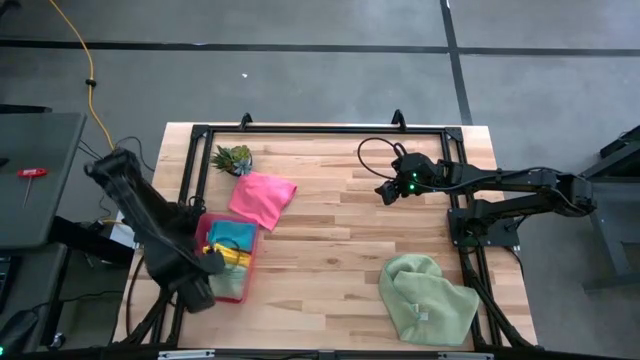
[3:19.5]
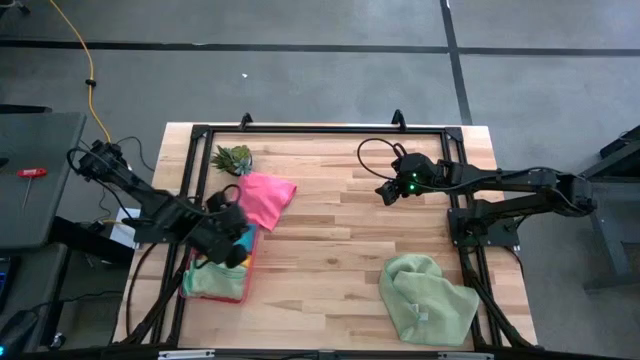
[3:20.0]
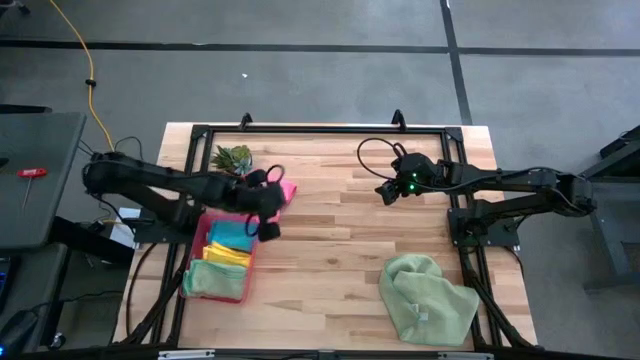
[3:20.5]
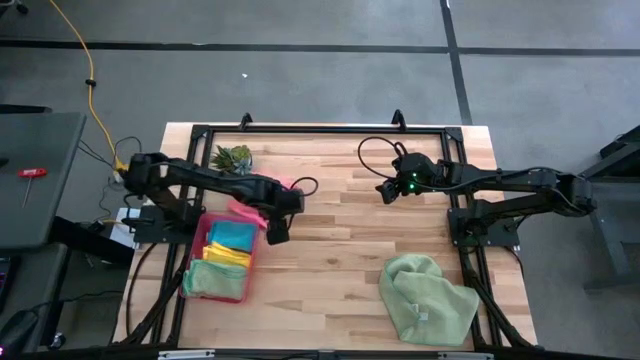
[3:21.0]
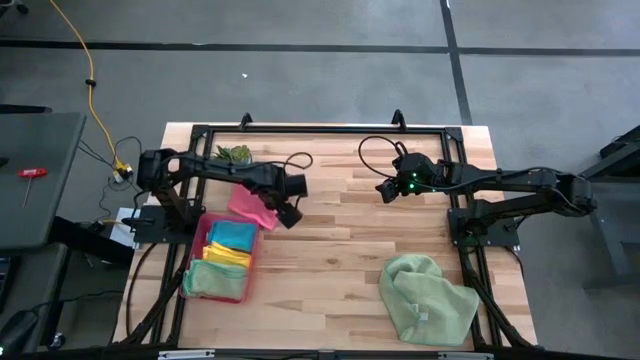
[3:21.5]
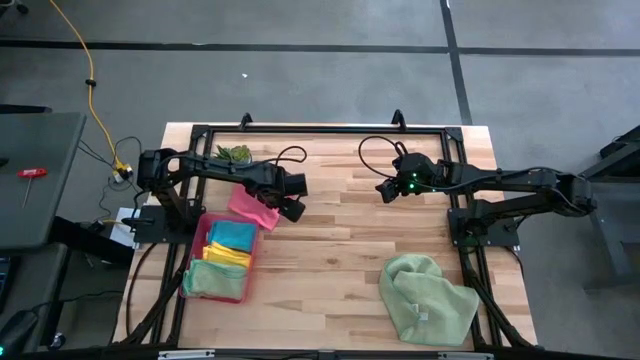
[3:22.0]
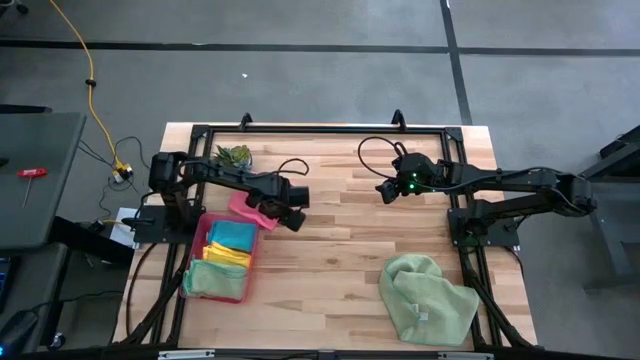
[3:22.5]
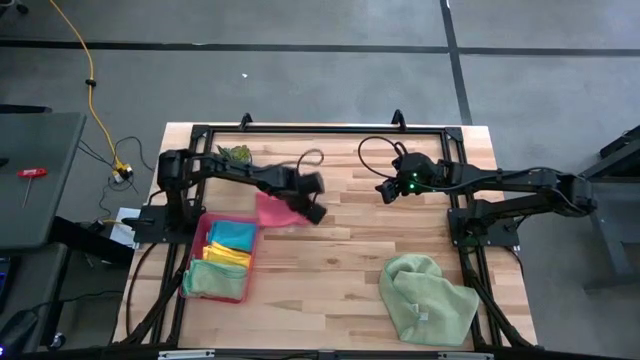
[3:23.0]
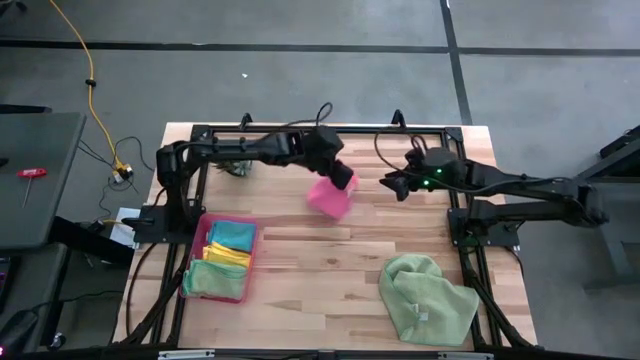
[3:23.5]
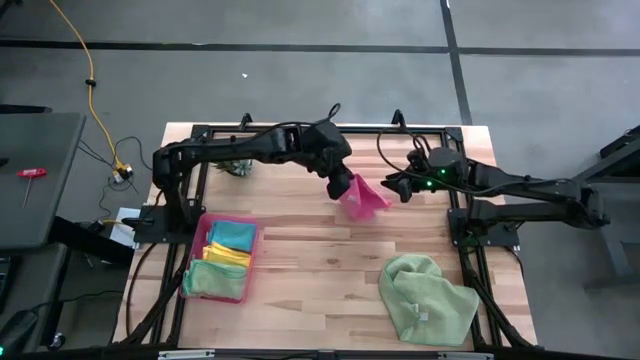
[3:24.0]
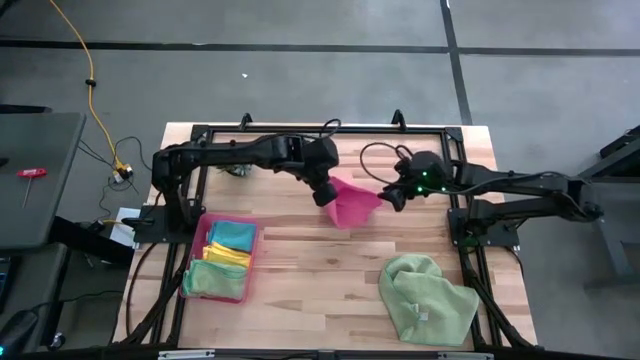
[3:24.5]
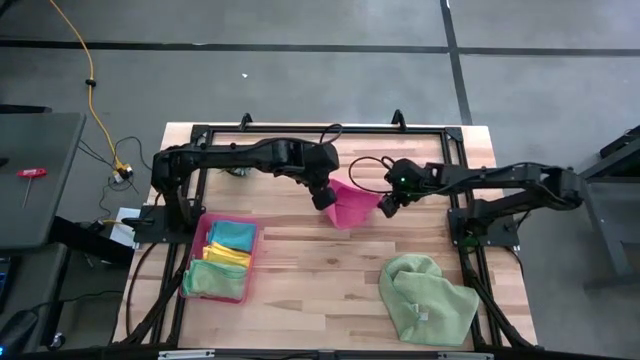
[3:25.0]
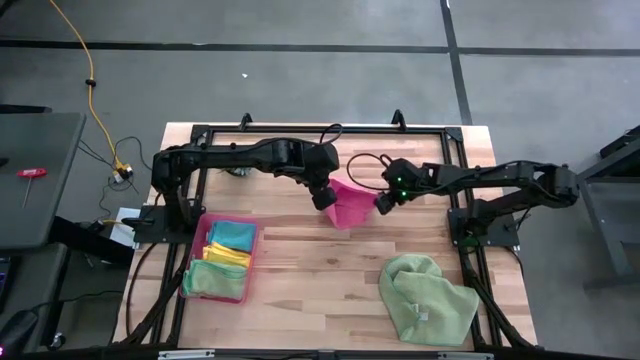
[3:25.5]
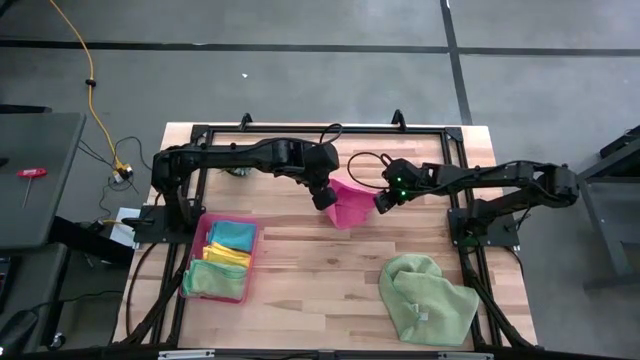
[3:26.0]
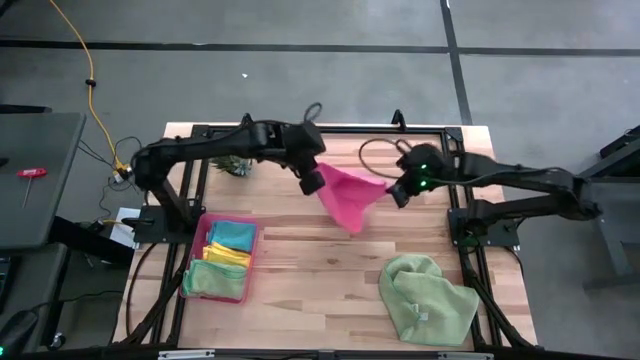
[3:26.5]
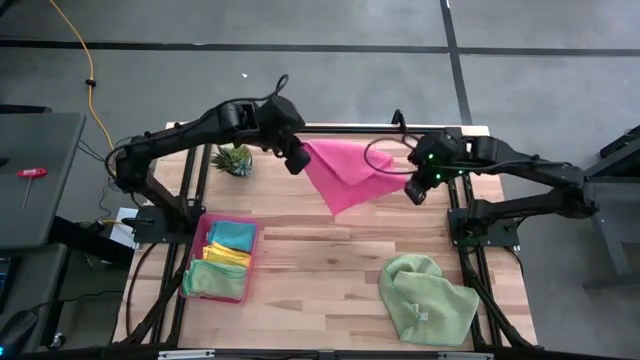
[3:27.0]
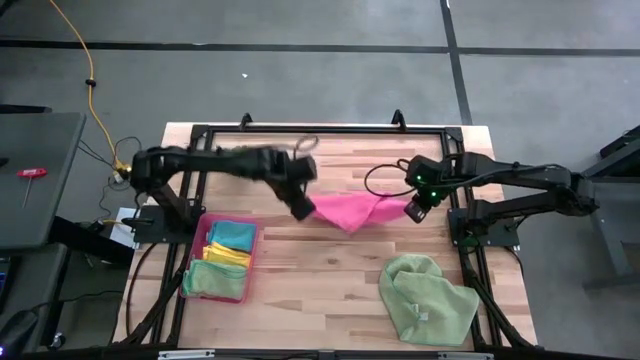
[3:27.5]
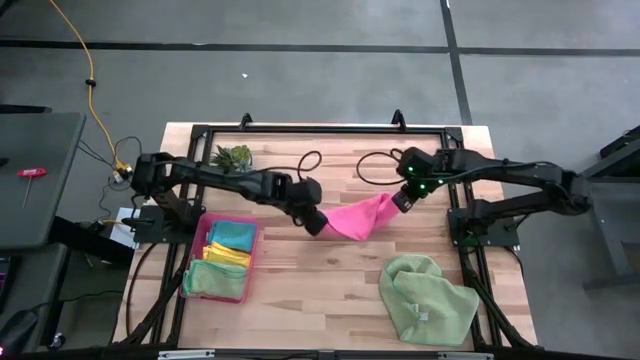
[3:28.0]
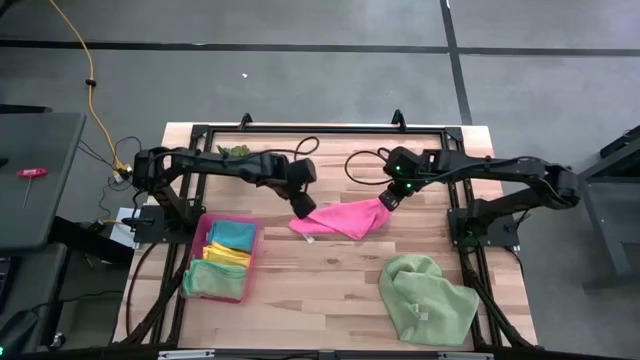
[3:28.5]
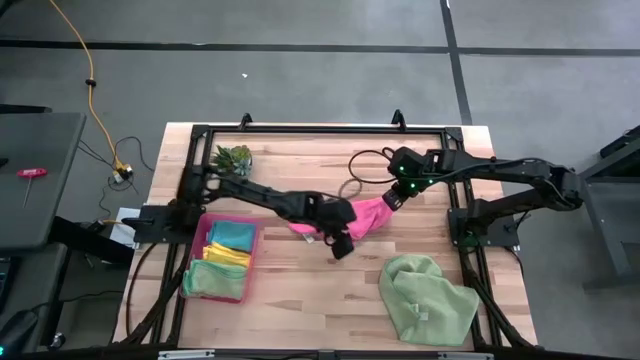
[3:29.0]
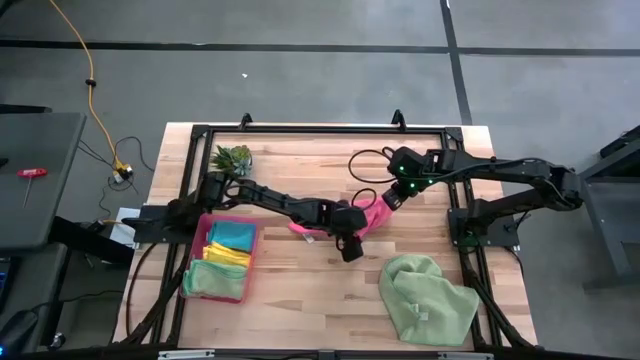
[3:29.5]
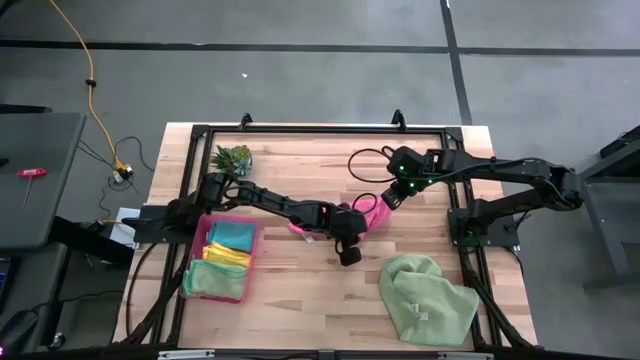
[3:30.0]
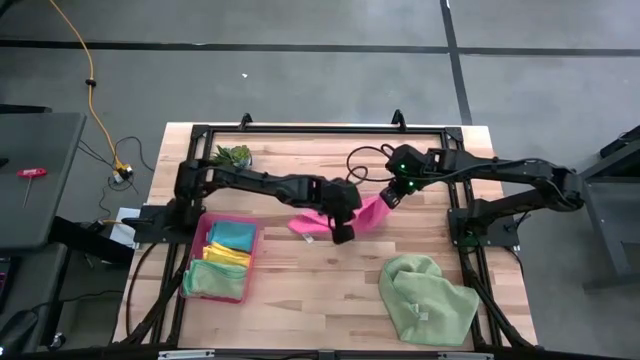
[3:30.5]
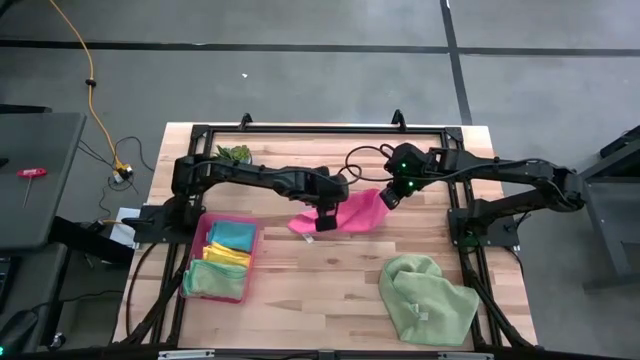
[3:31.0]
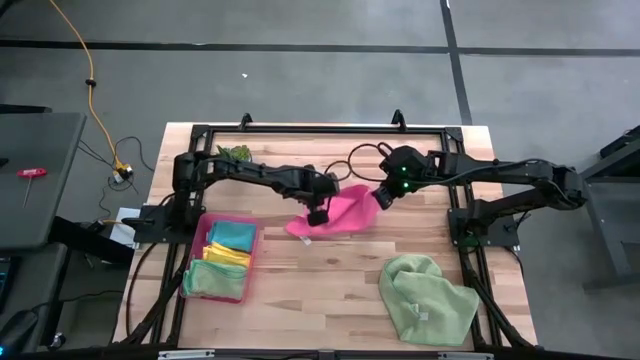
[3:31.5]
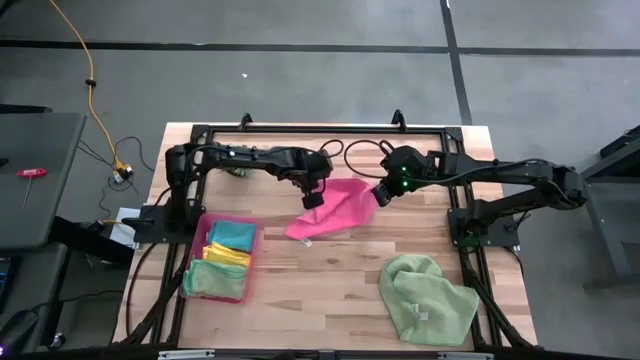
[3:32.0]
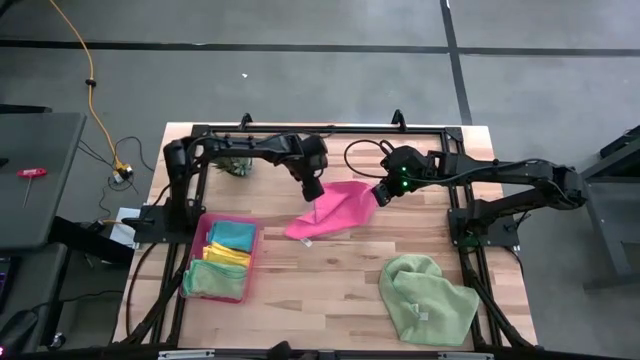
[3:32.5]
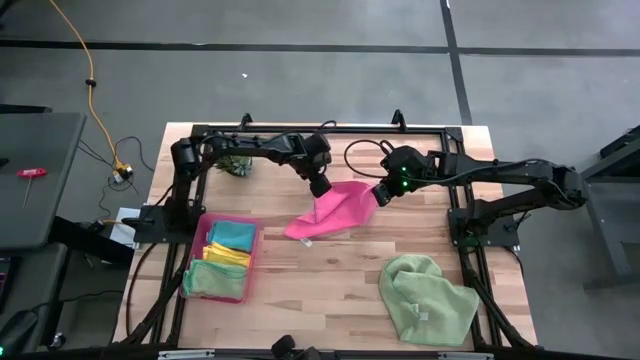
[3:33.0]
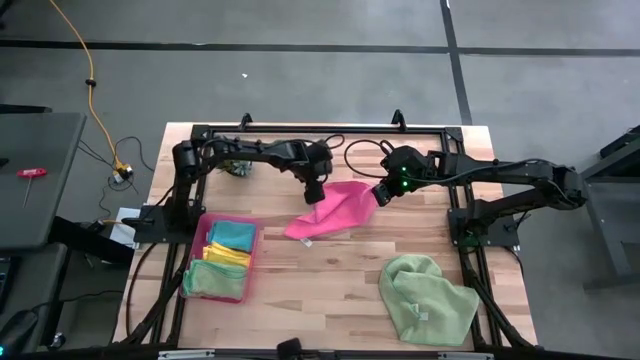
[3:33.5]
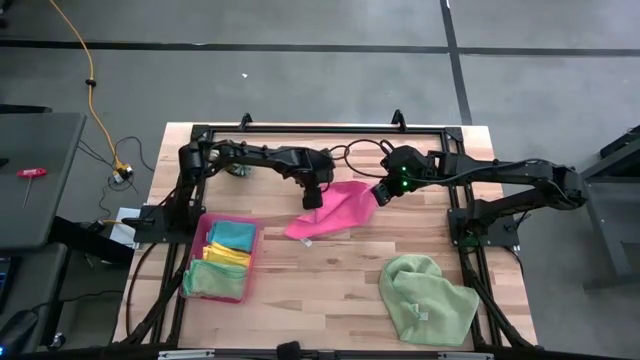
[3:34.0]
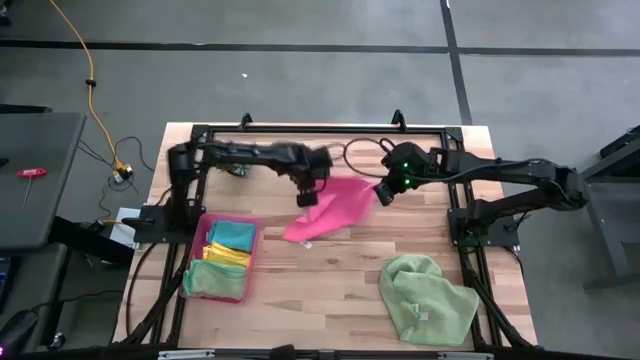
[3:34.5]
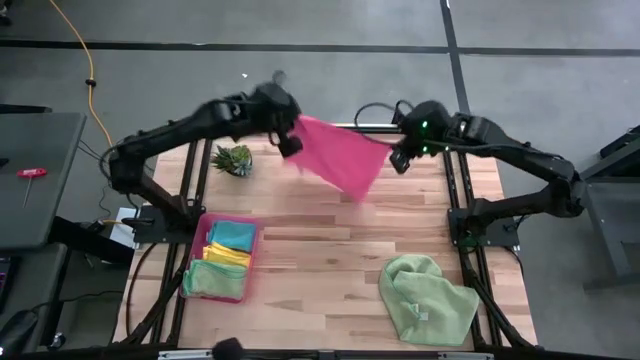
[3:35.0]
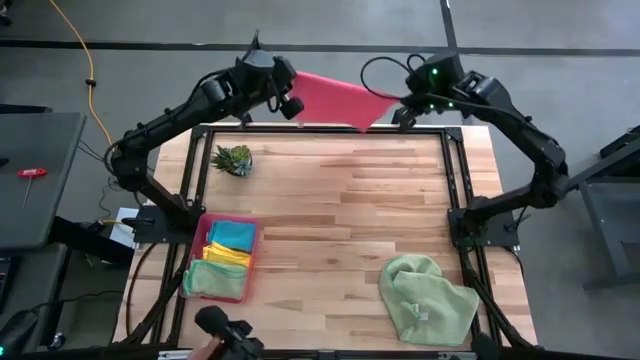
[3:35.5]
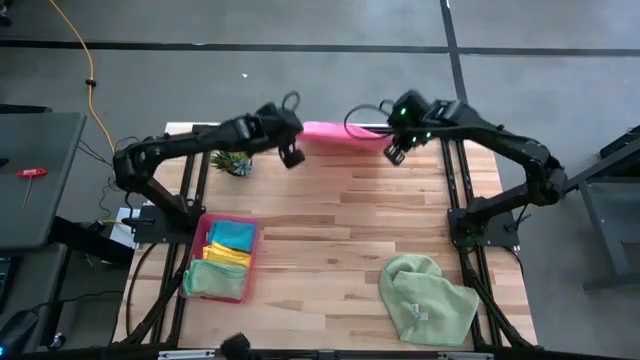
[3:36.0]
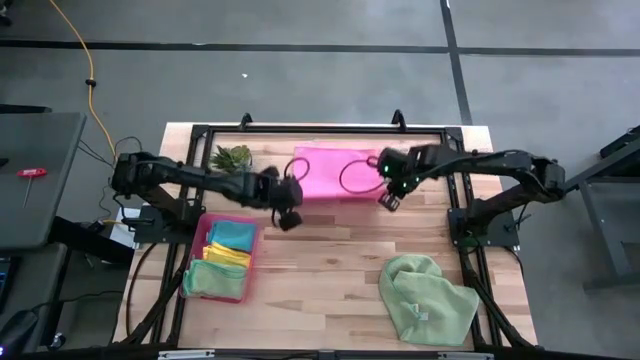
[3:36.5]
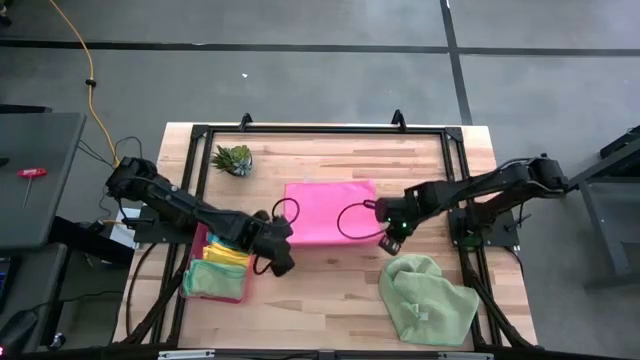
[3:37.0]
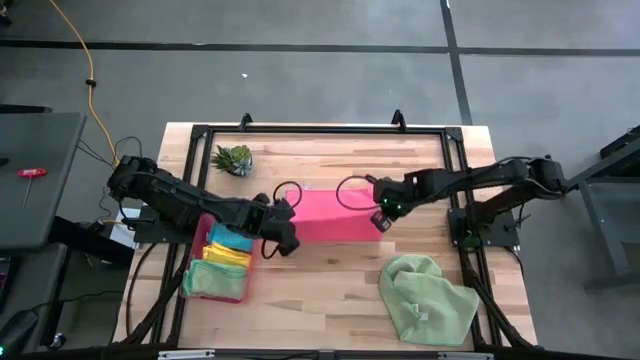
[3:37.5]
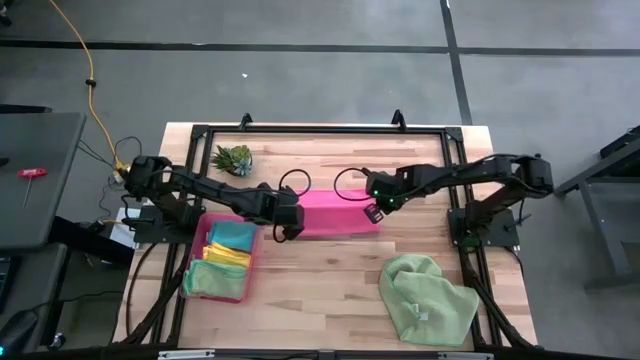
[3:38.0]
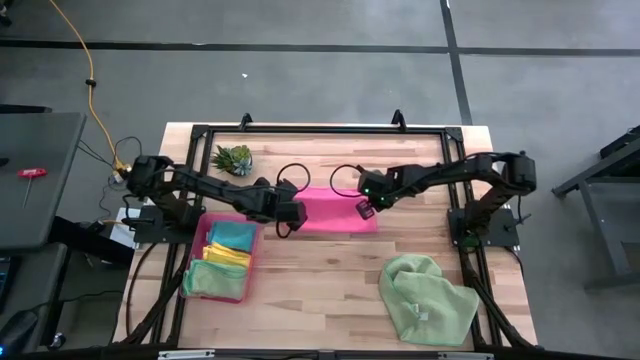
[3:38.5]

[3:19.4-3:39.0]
Task: Fold microfiber towels
Fold the pink microfiber towel
